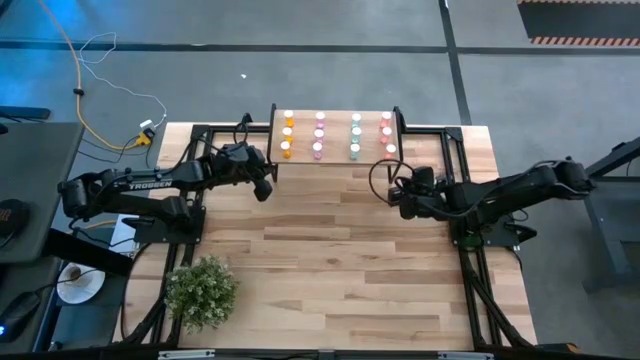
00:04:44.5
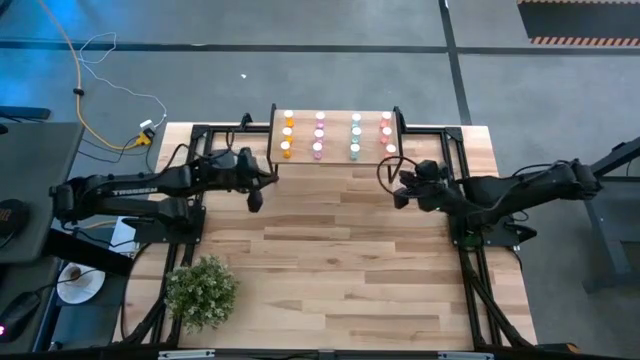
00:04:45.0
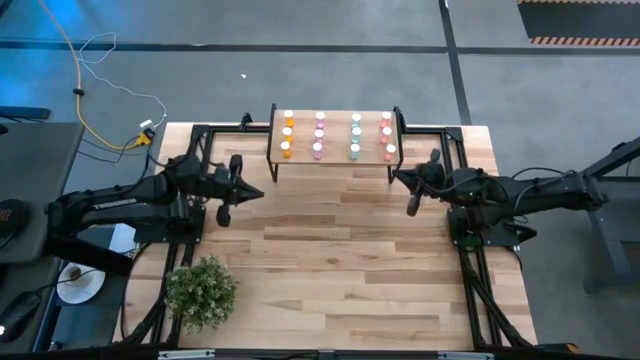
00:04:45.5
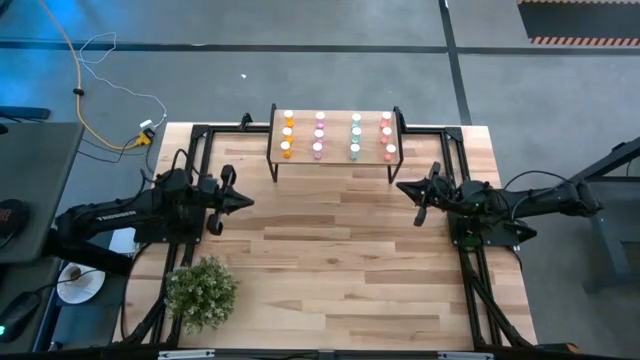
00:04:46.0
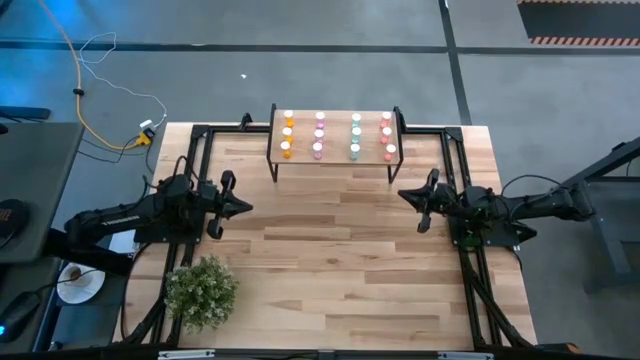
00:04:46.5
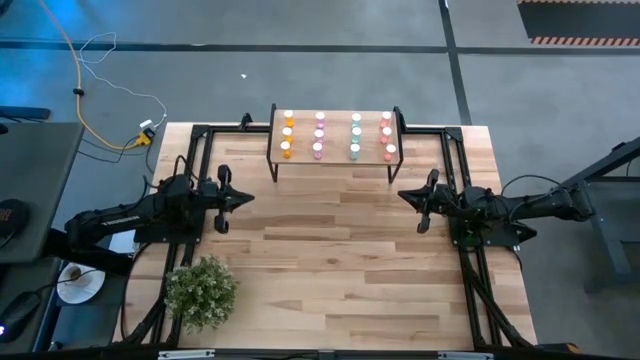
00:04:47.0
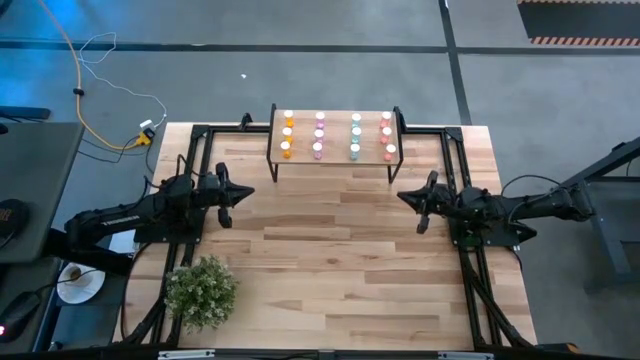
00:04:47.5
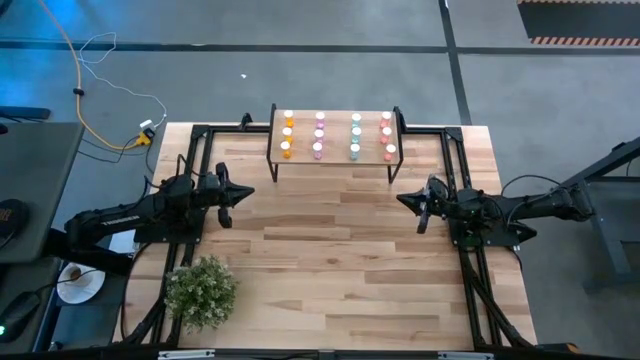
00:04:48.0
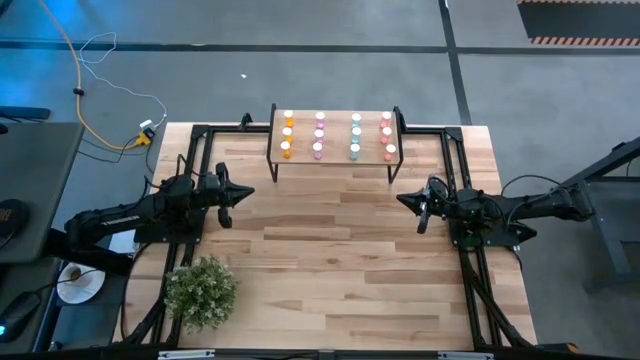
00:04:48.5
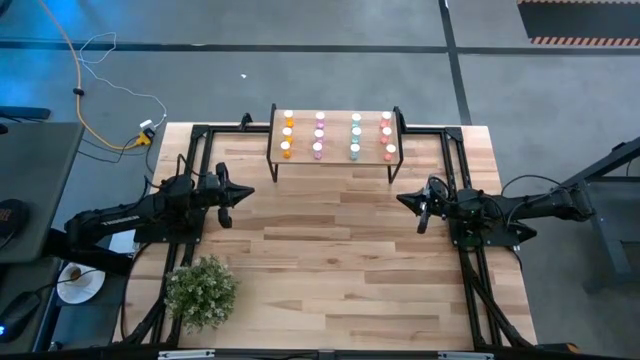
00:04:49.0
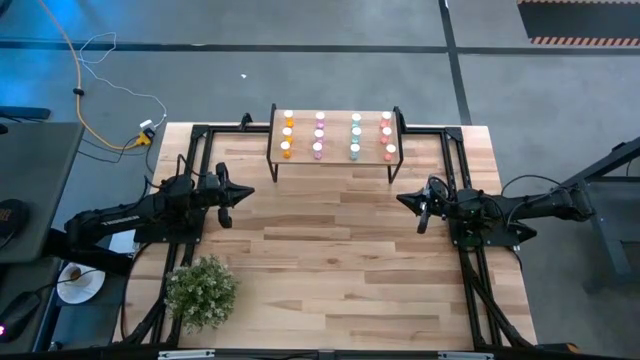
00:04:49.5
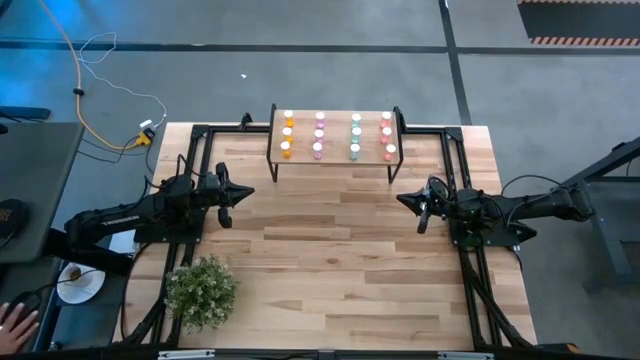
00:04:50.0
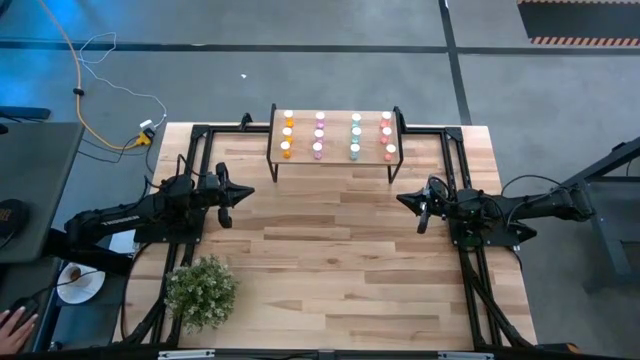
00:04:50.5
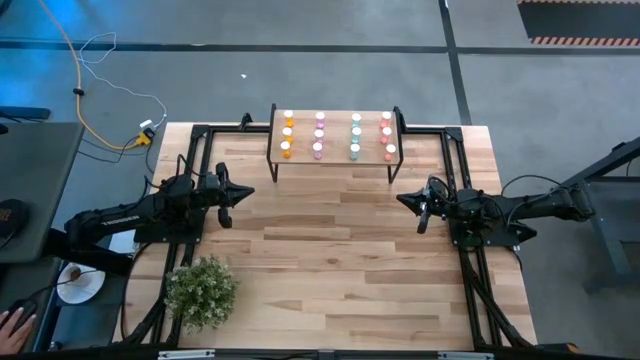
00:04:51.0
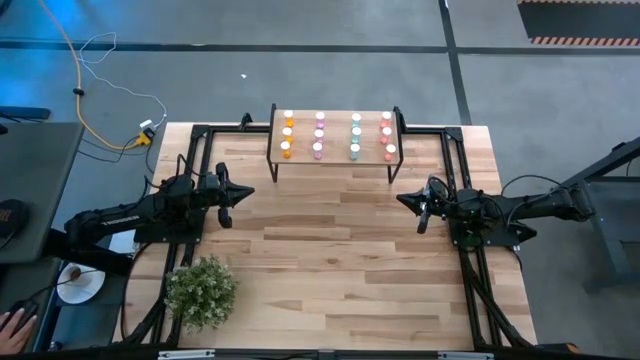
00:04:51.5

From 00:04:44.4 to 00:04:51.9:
Task: Pick and place medicine bottles onto shelf by color
Return to Home Position

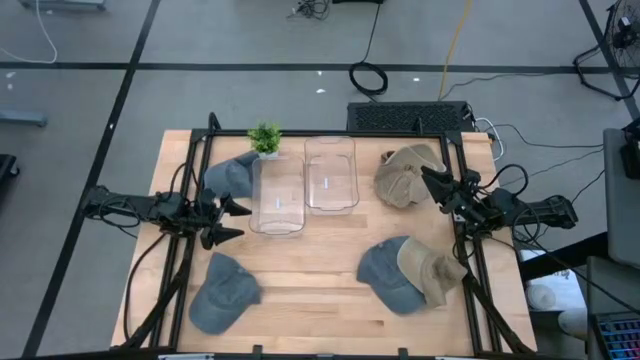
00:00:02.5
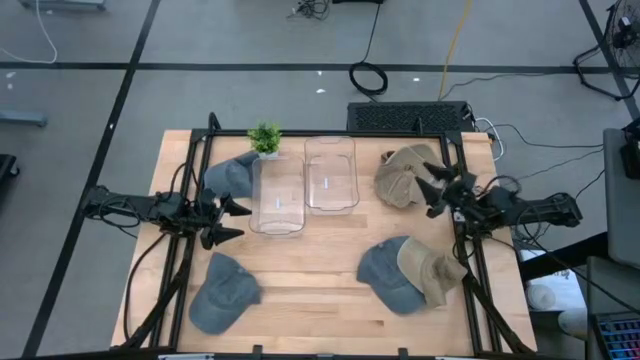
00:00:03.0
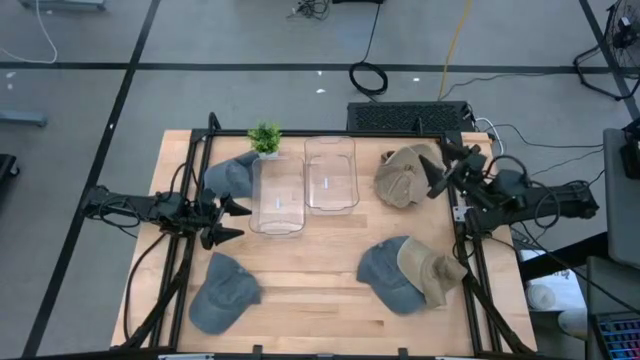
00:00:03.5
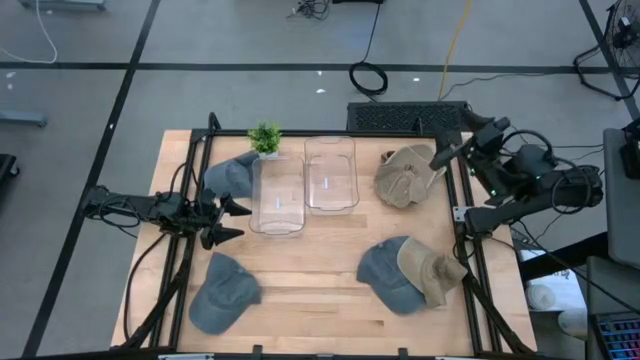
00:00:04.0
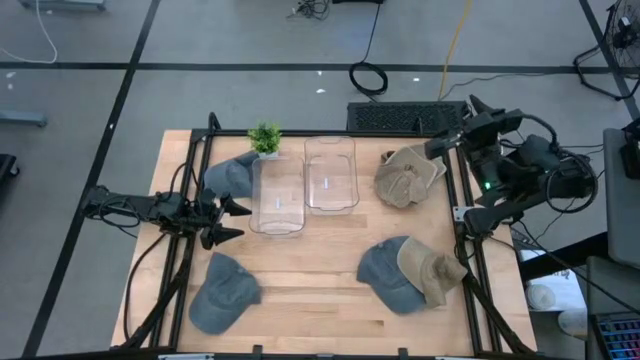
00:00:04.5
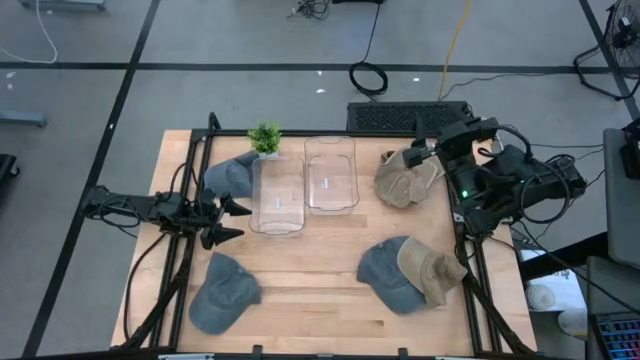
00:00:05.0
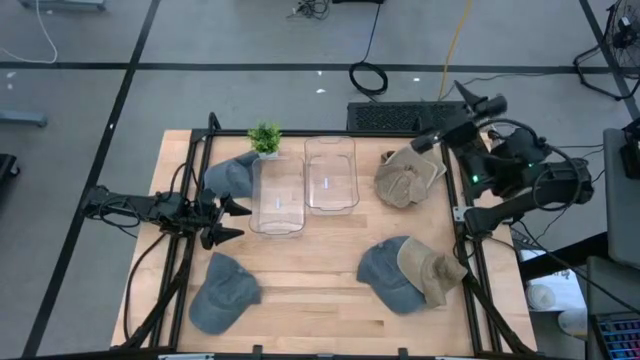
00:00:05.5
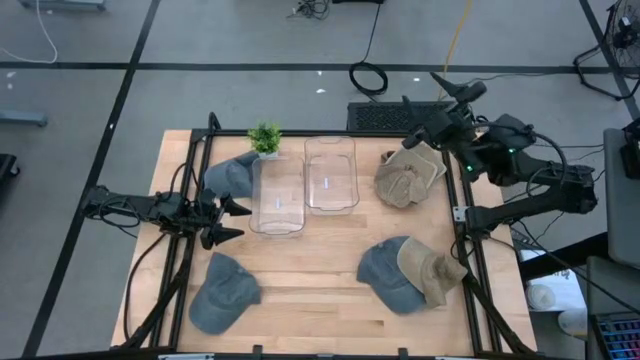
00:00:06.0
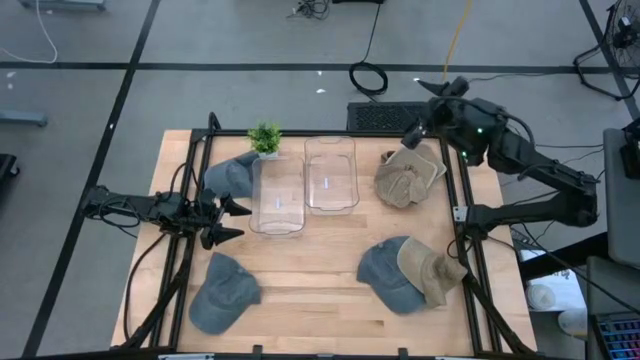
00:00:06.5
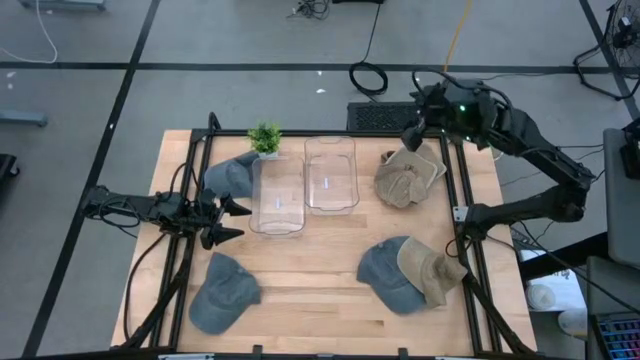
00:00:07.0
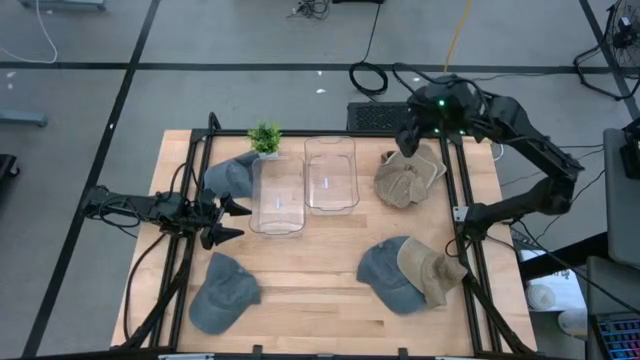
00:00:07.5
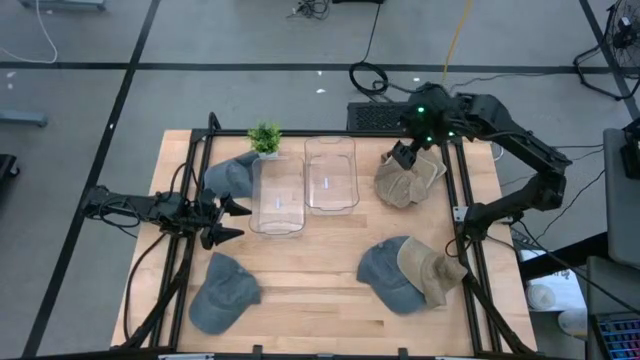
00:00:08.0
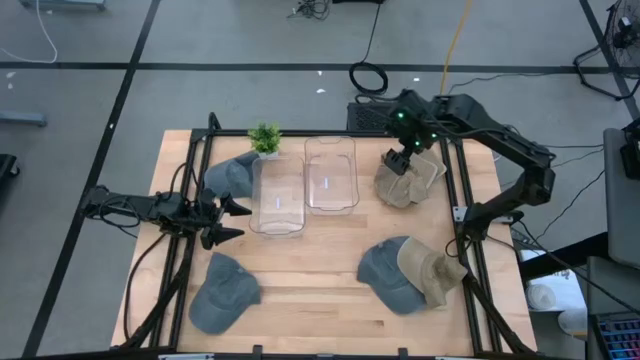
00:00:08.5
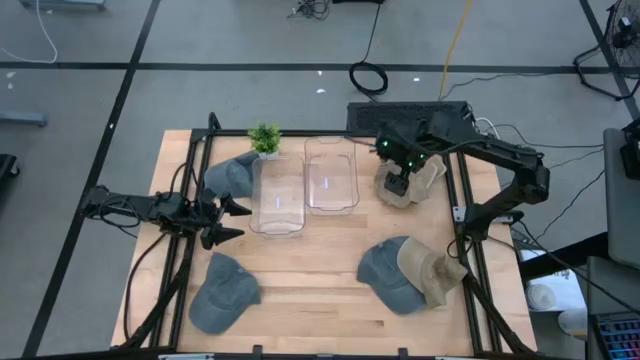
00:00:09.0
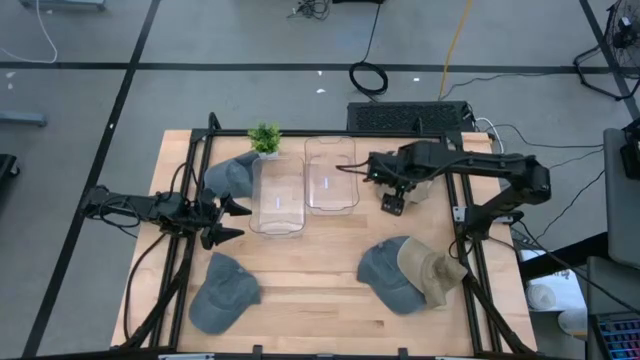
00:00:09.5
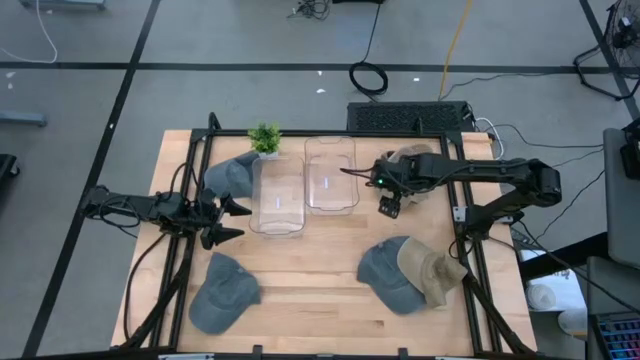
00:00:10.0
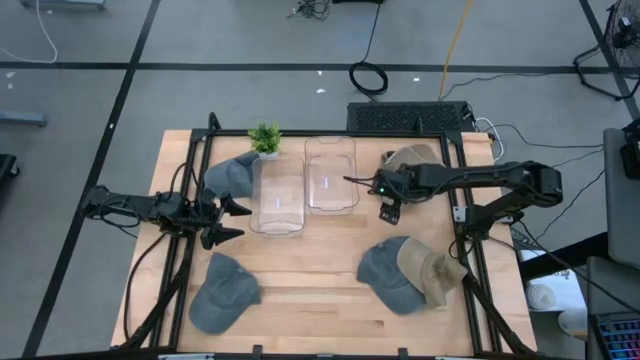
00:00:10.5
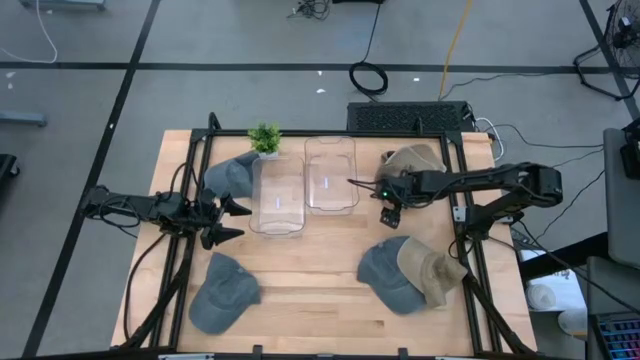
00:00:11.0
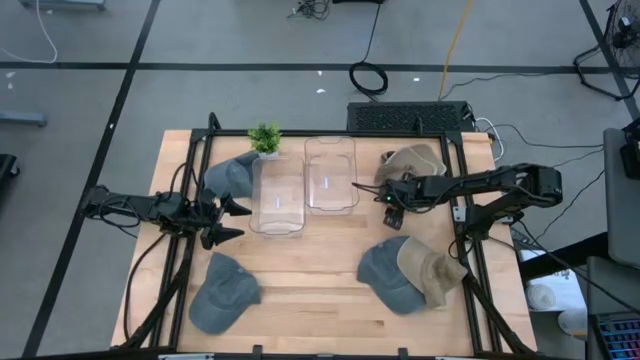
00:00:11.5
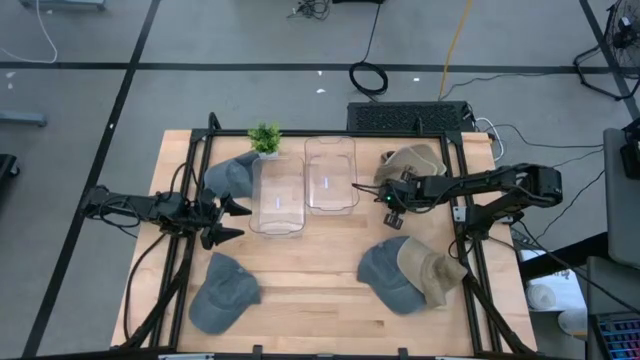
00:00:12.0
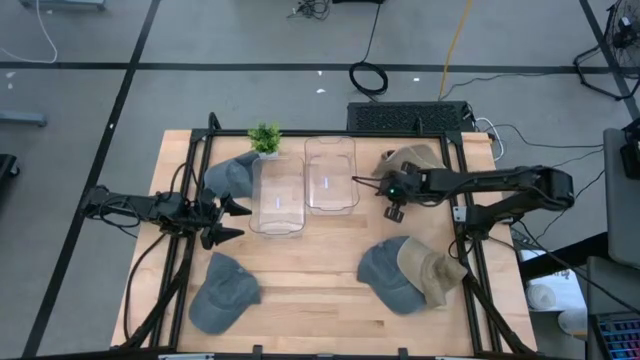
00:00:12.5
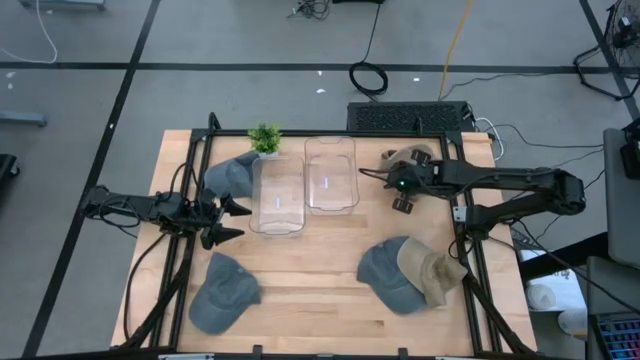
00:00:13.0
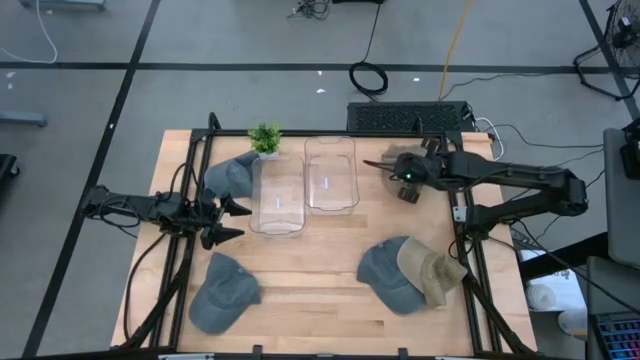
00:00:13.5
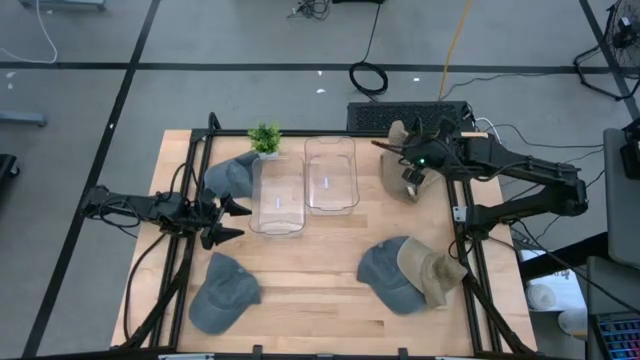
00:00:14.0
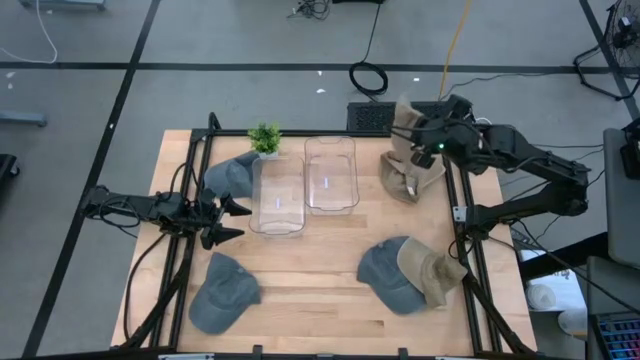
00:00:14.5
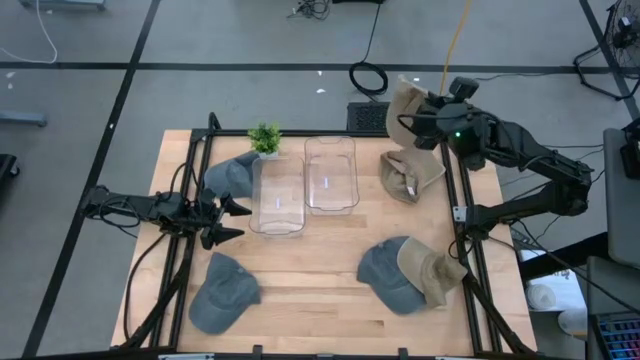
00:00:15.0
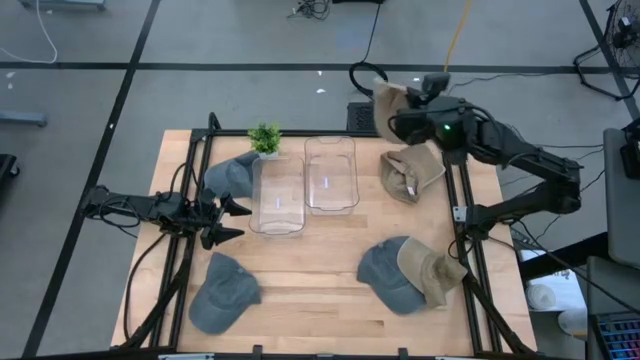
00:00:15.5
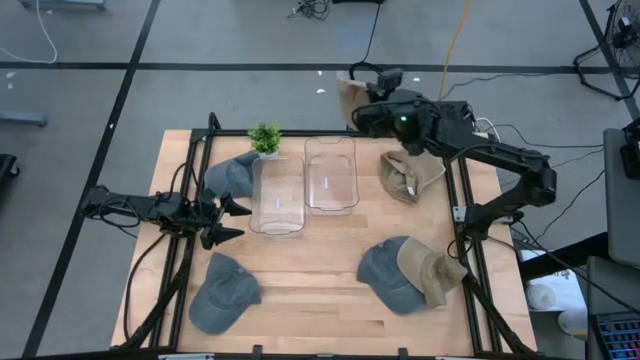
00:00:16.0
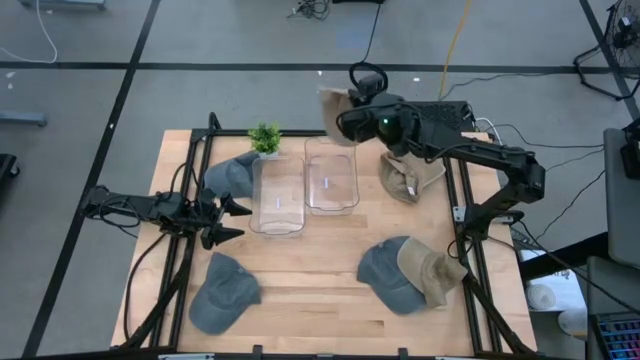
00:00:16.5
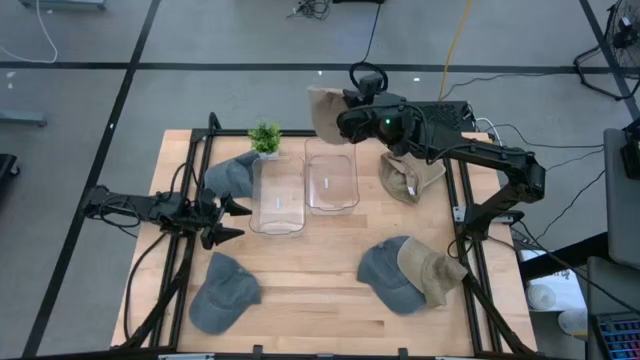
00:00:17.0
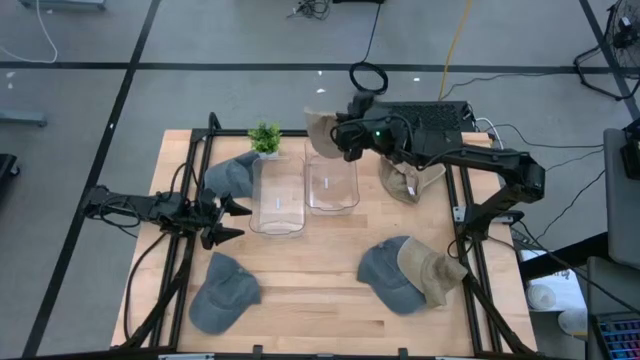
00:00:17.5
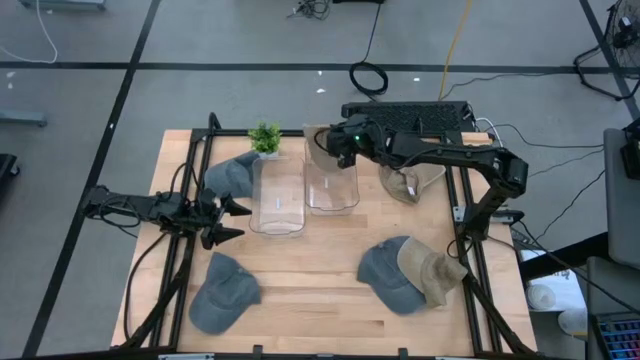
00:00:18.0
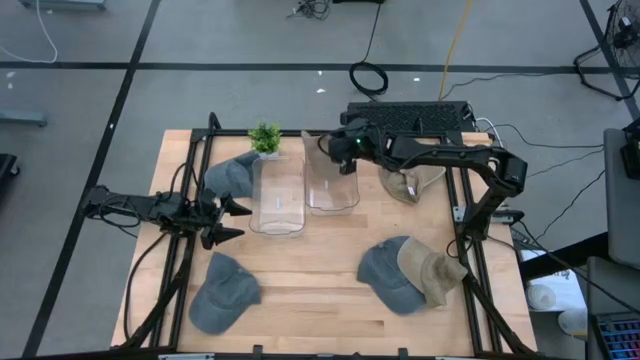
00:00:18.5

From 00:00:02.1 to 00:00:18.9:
Task: Pick & Place hat
Put the top brown cap into the right transparent bin
